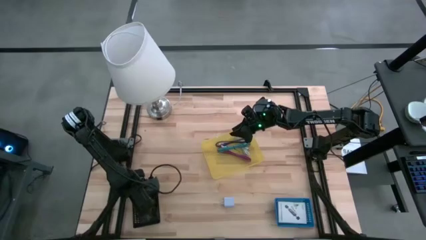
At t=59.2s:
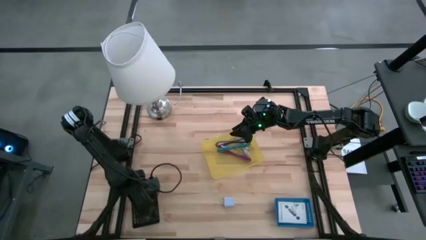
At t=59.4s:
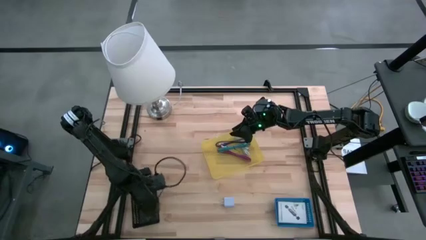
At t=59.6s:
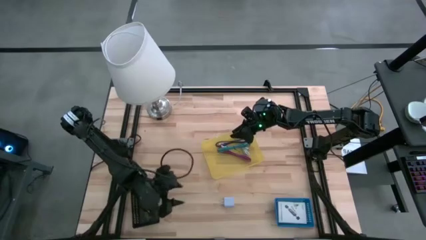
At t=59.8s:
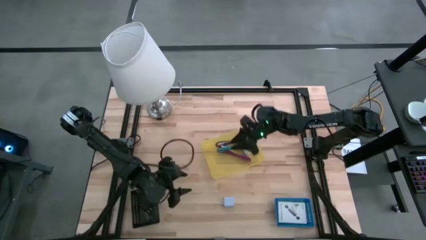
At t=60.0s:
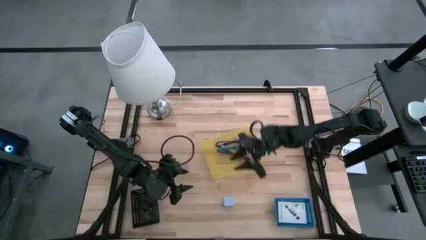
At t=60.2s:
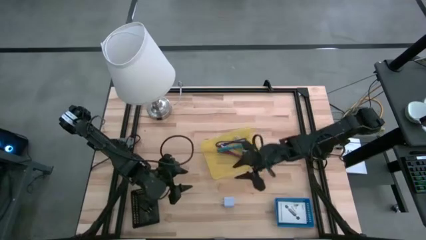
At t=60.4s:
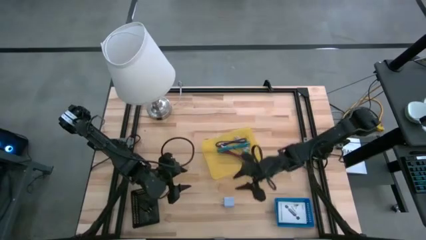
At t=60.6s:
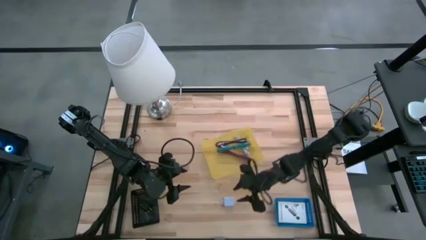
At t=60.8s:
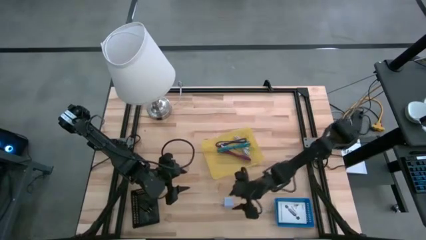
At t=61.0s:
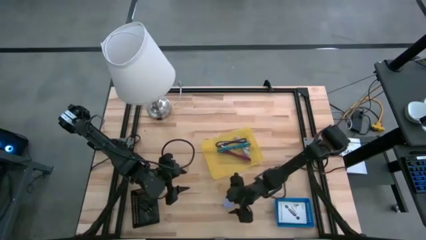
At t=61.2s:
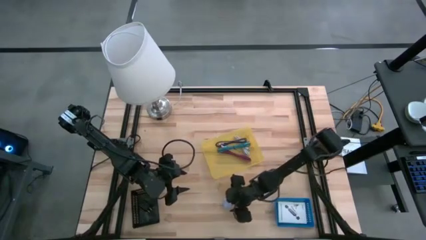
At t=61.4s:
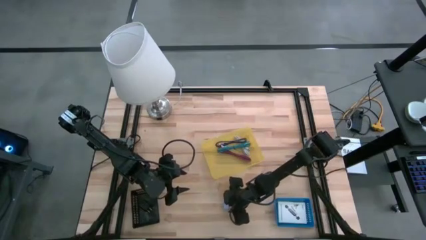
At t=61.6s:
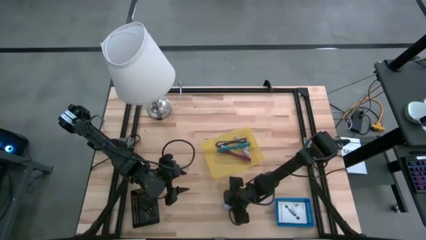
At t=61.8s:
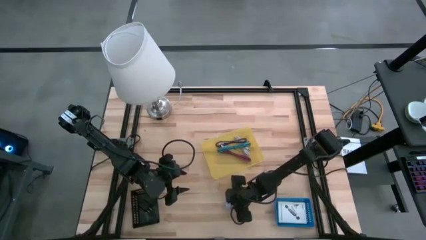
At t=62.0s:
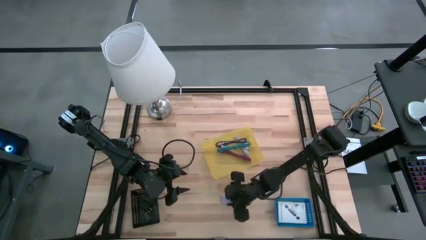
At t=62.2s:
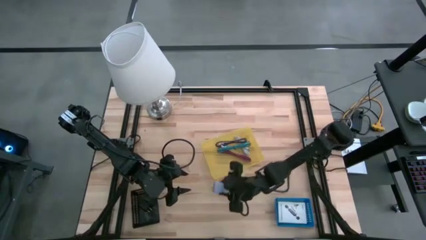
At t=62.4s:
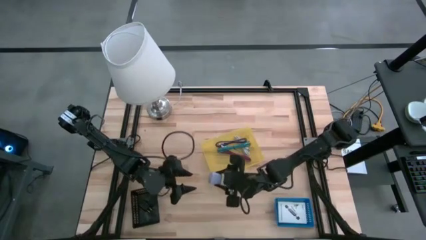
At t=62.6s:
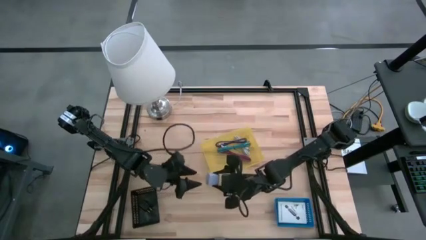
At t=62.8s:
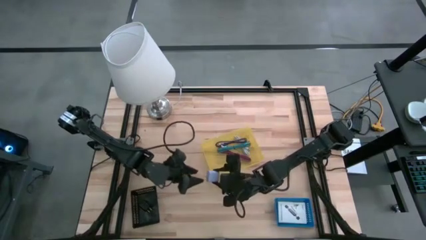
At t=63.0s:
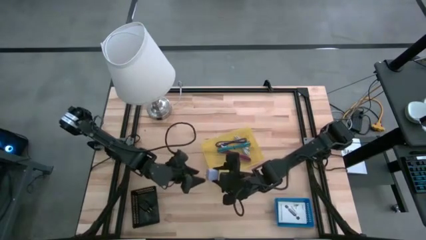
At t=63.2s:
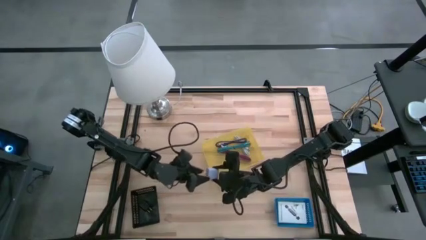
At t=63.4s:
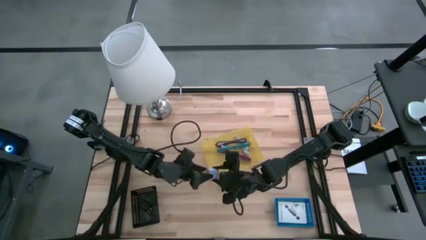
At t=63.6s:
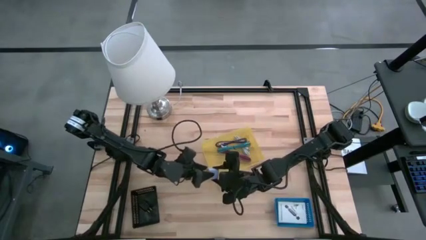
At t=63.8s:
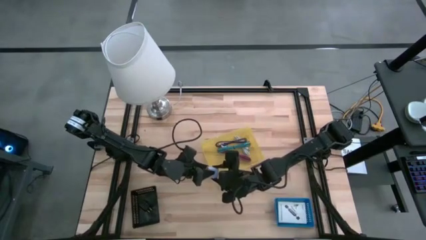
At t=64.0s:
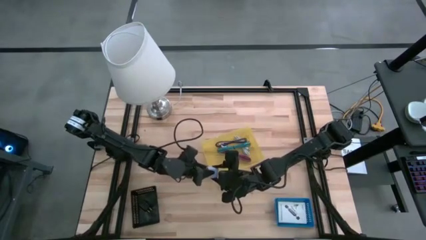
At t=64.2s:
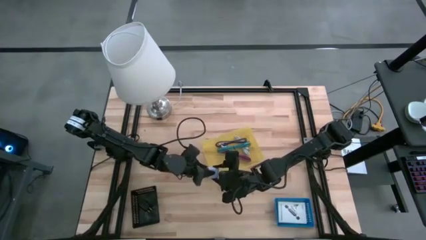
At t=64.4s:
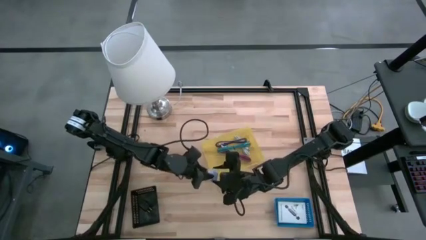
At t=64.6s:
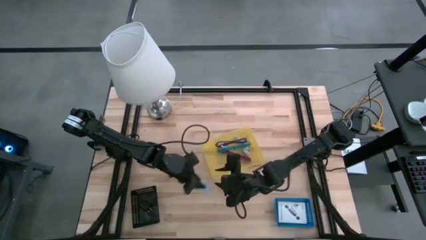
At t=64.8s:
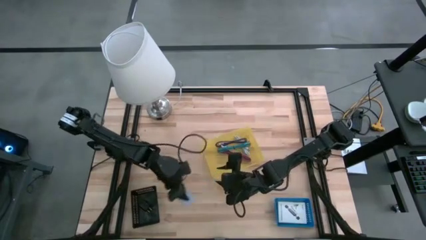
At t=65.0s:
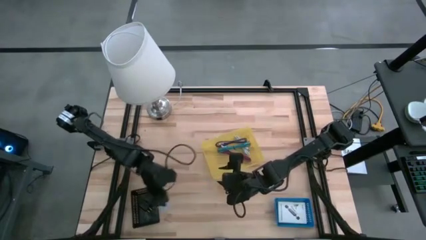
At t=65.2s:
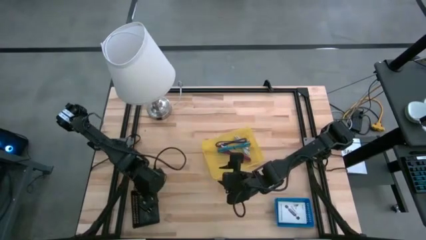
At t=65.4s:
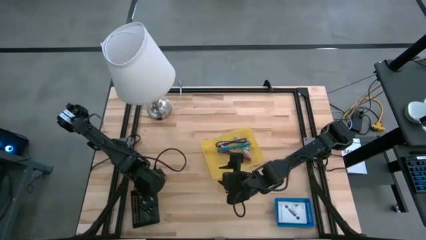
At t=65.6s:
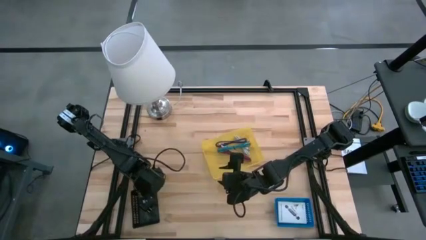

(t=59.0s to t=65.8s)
Task: Pick and place items into bin
Put the white charger adapter into the black bin

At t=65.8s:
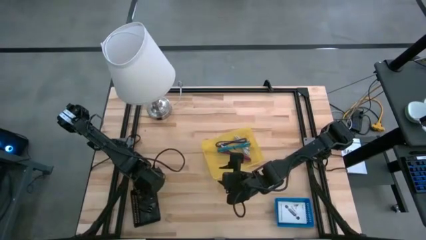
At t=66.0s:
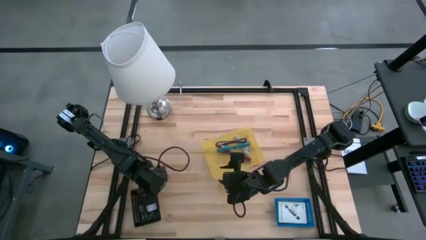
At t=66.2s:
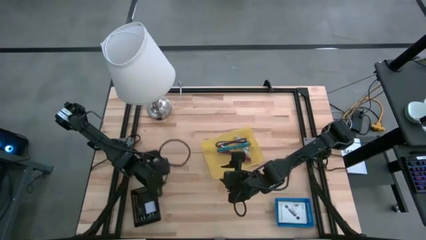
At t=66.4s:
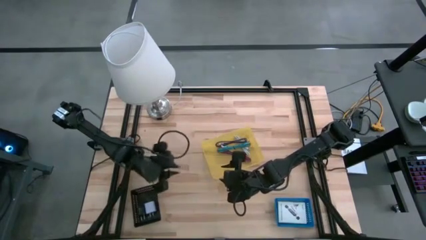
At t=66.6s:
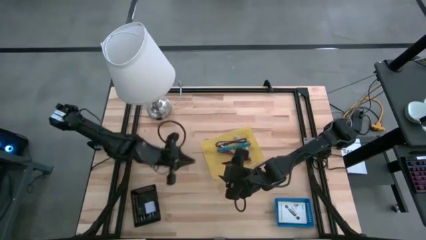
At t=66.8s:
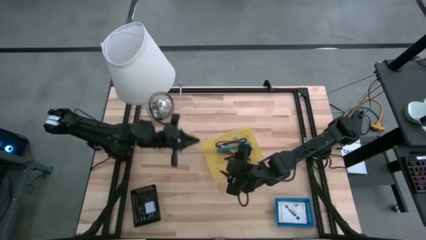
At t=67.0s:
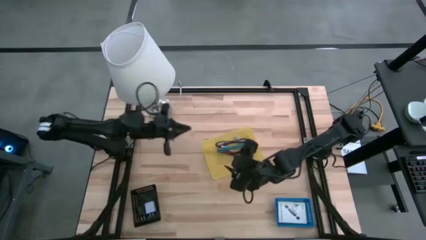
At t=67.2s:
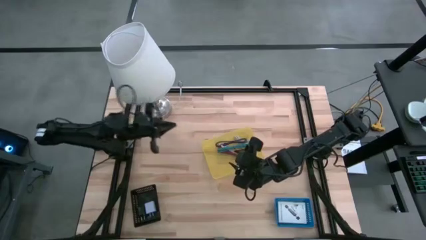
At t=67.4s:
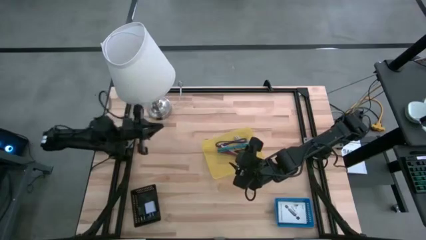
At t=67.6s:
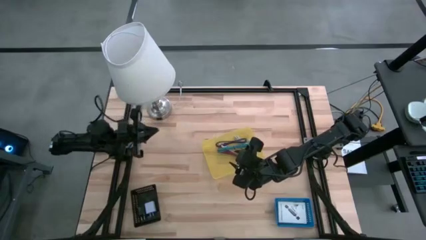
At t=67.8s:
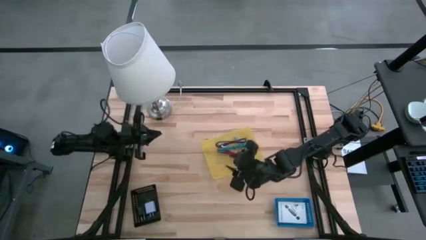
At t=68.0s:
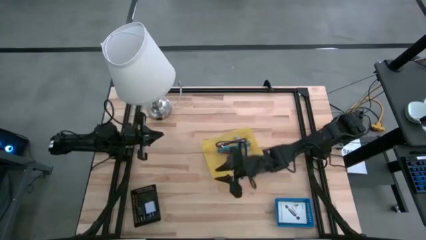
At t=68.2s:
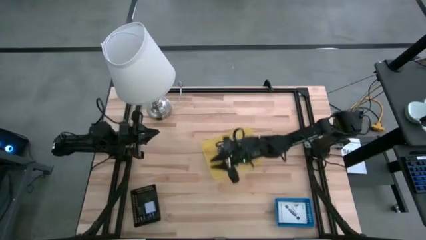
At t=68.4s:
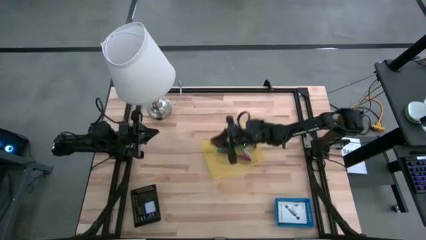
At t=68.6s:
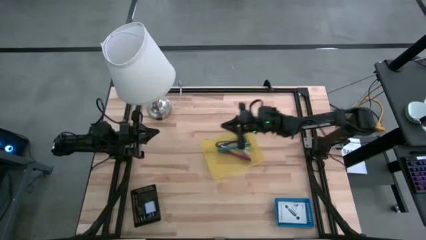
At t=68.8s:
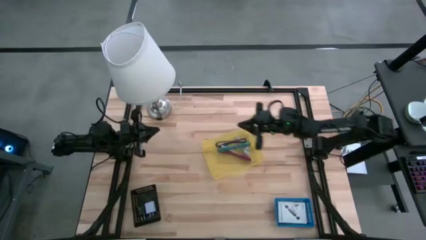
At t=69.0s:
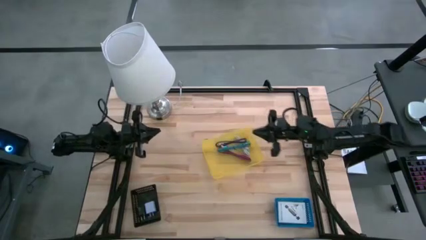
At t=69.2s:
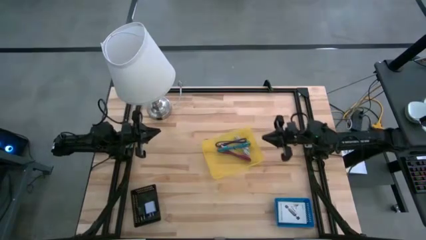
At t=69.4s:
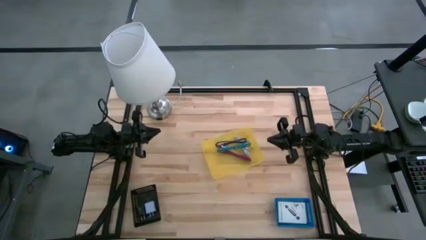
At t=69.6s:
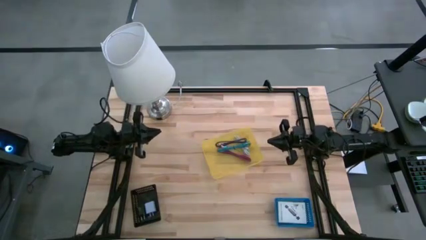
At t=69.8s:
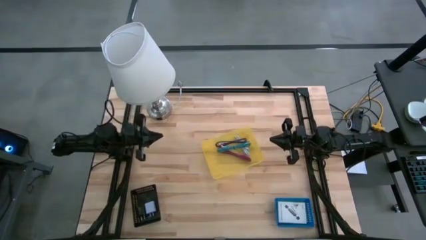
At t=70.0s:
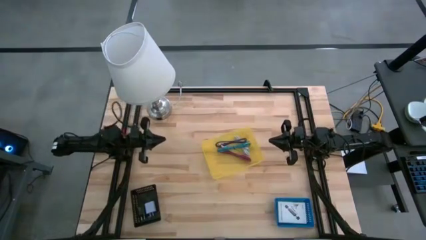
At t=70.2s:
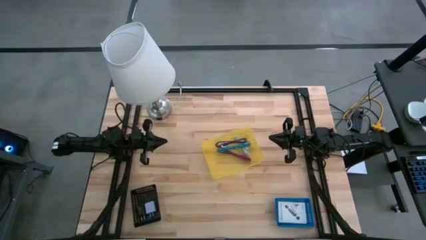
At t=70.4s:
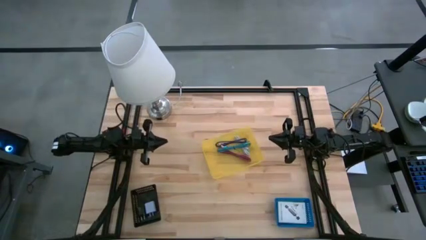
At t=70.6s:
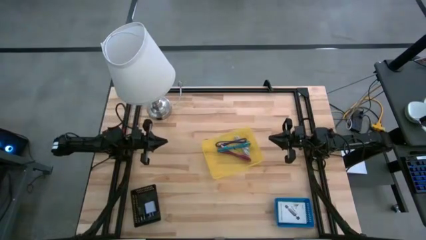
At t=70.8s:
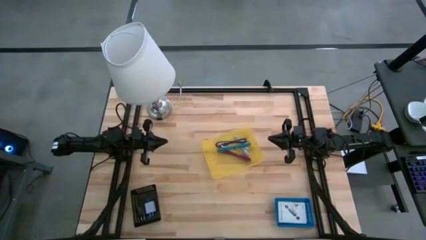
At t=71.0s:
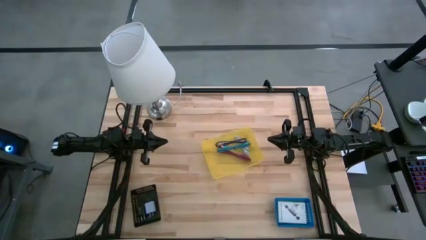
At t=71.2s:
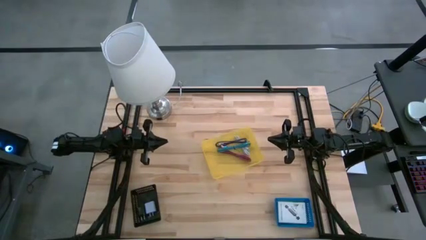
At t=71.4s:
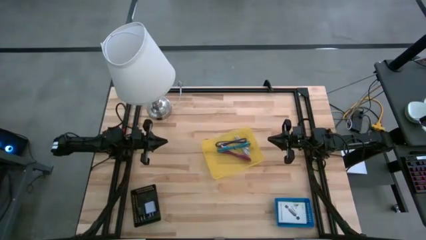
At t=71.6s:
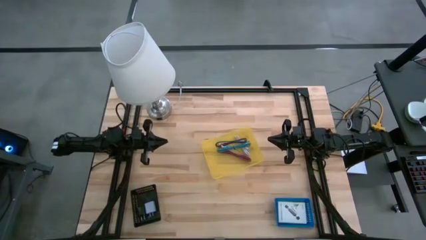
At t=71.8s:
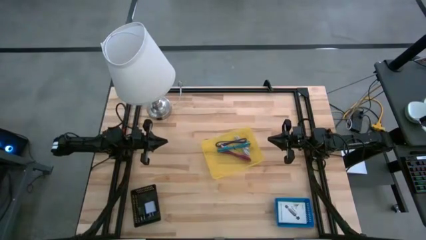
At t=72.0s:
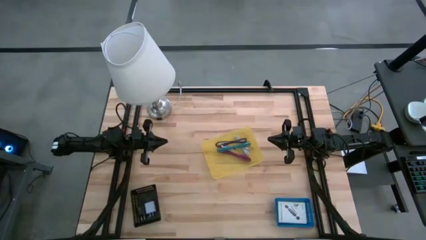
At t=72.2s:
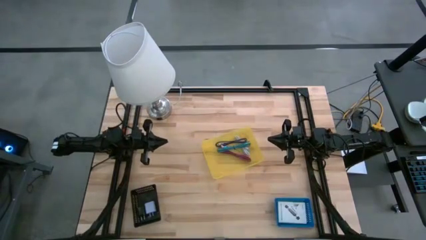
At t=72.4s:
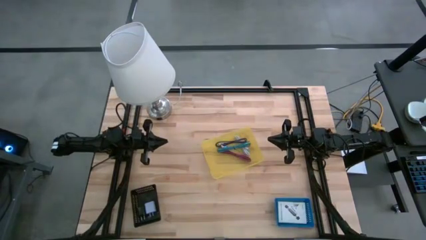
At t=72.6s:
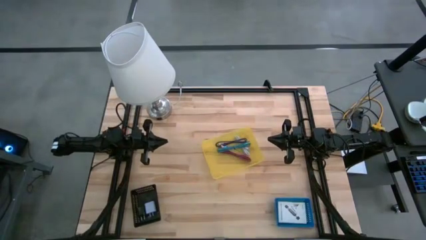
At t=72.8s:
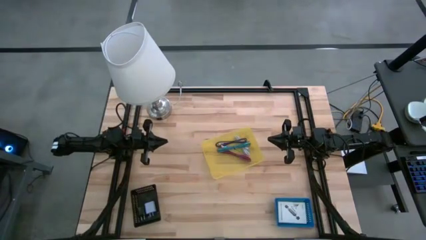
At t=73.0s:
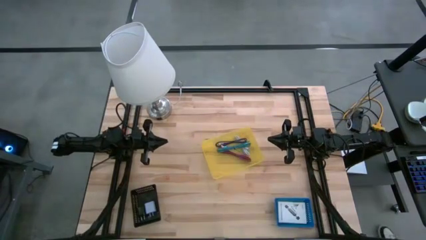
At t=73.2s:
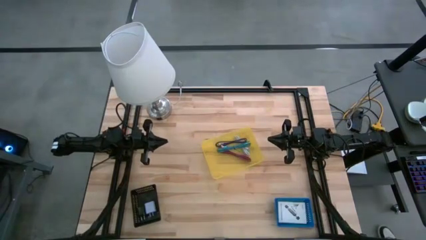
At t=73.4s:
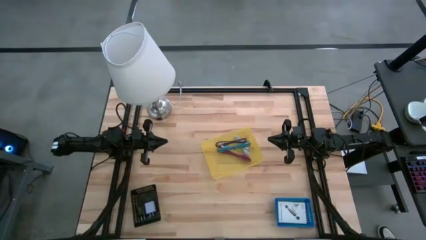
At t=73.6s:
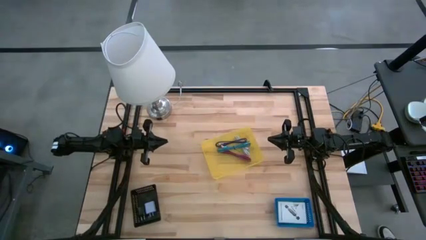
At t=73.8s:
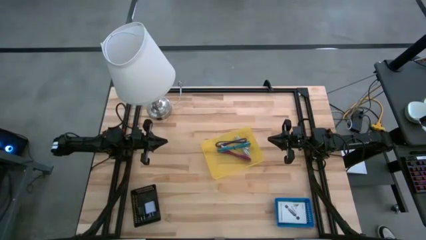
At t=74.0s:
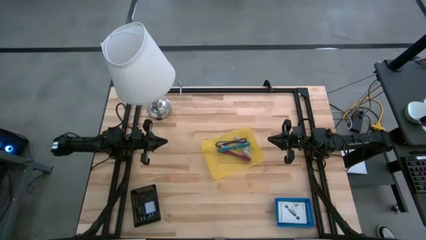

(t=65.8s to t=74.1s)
Return to Home Position
